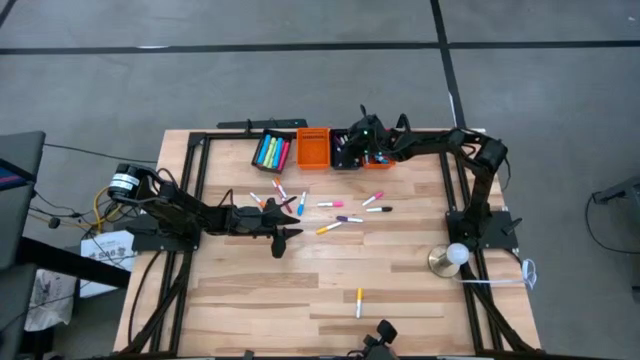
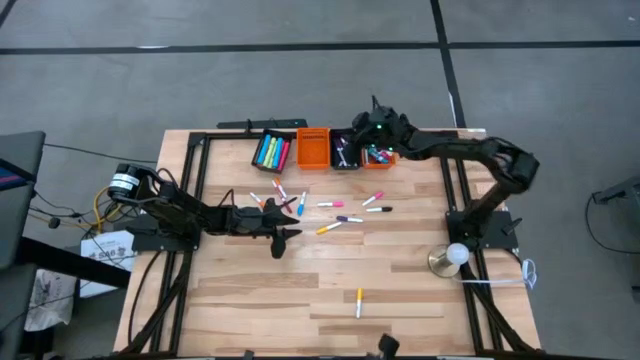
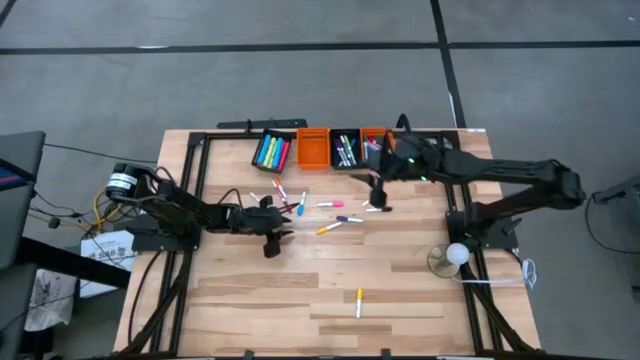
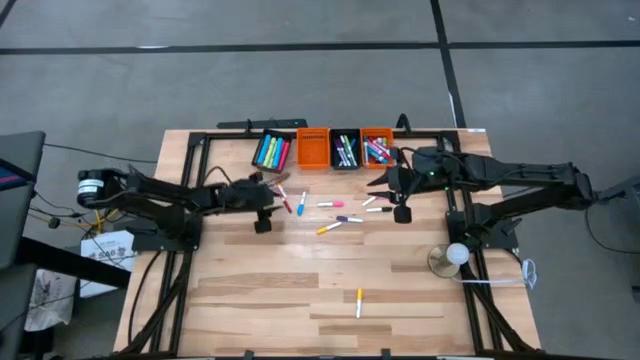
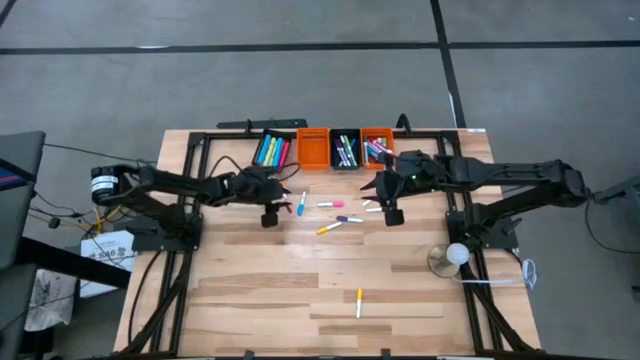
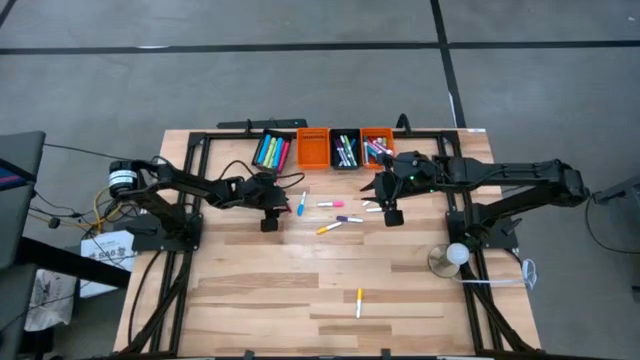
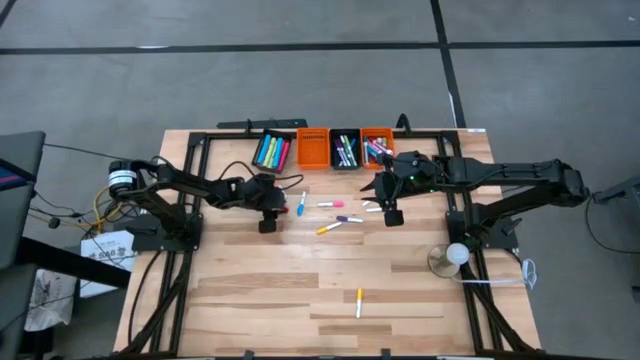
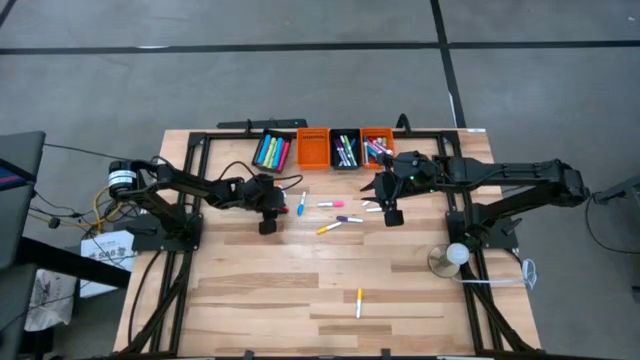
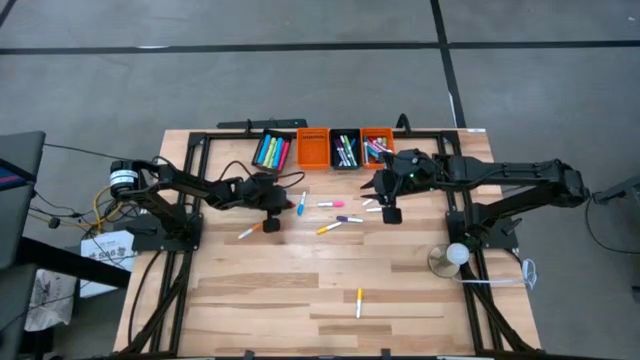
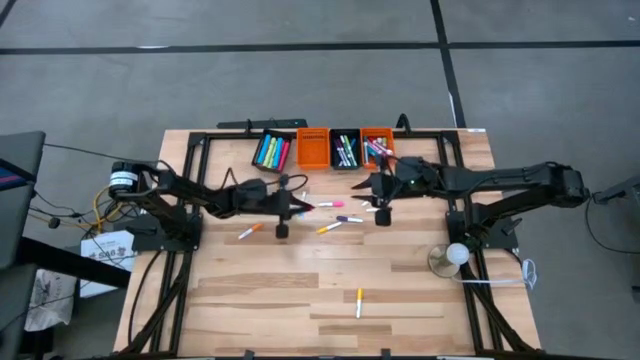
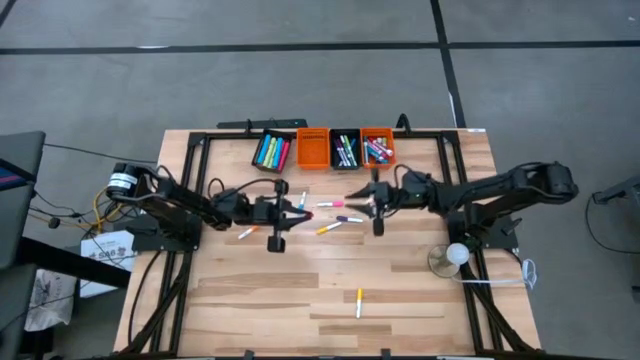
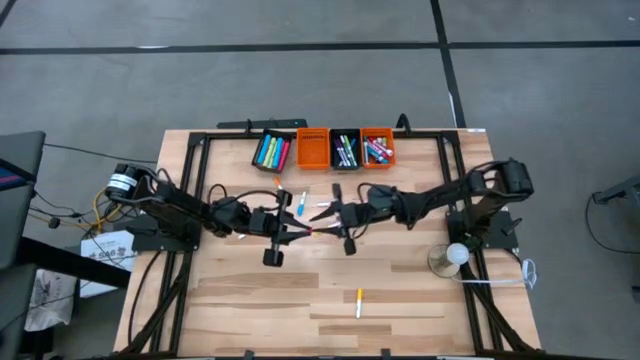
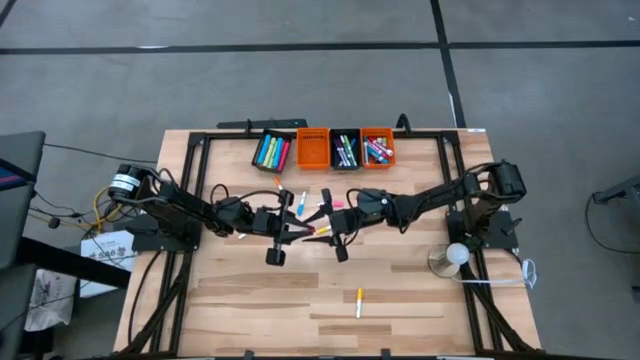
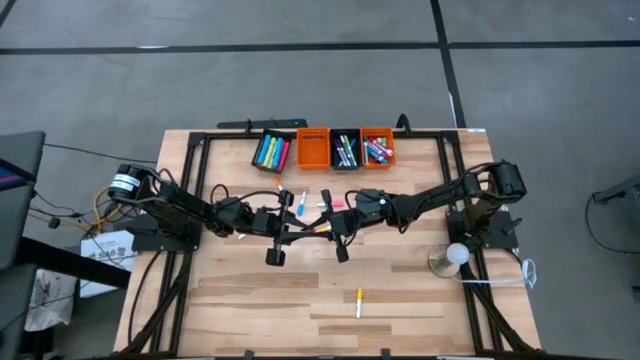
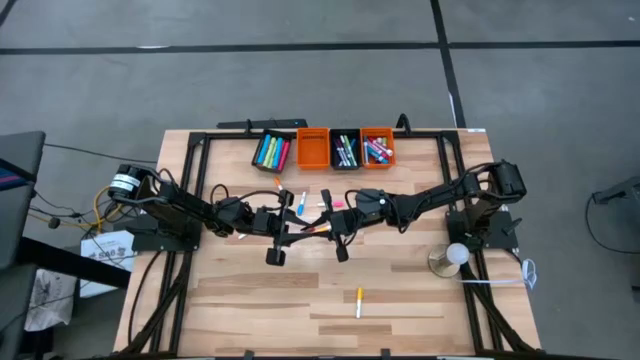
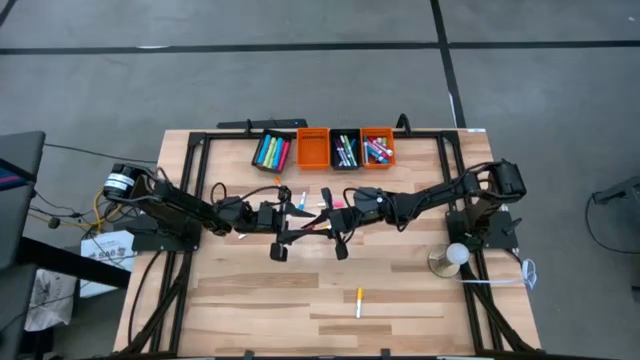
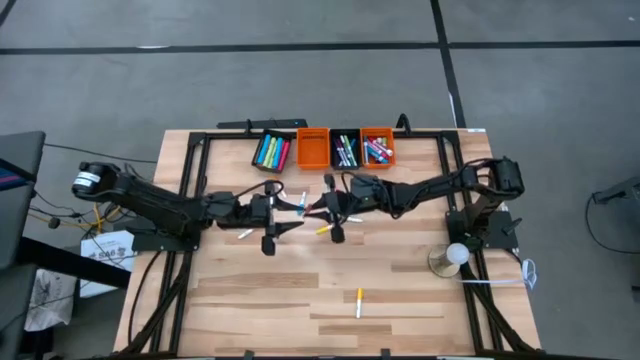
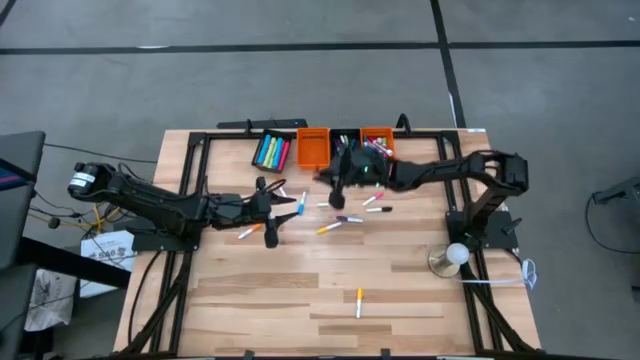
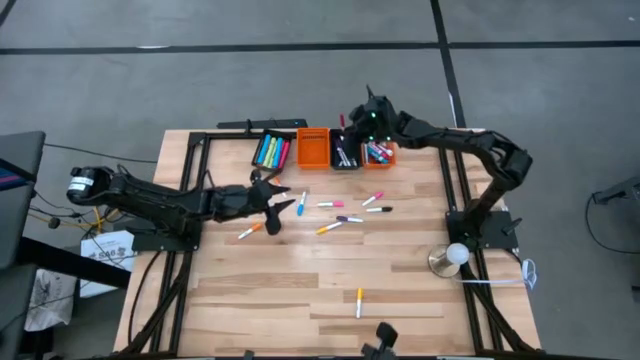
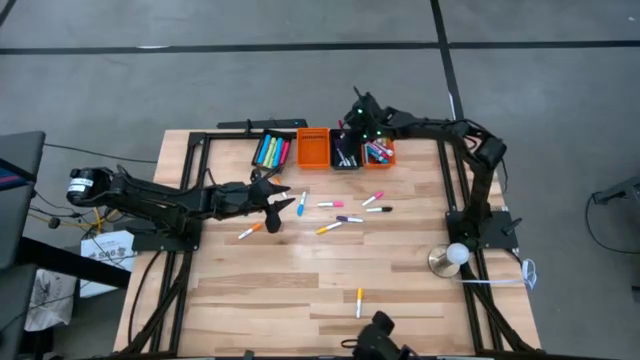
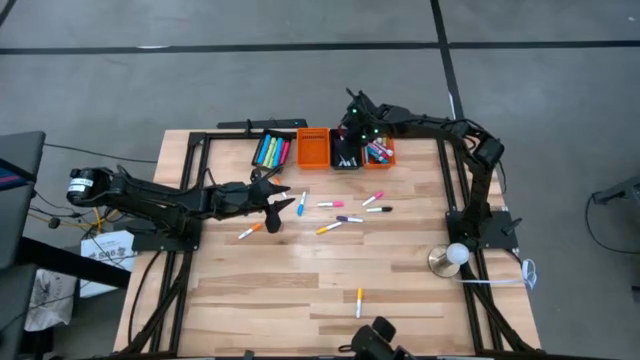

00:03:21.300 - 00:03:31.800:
Task: Pick & Place Markers
Put the small red marker pen into the right black basket

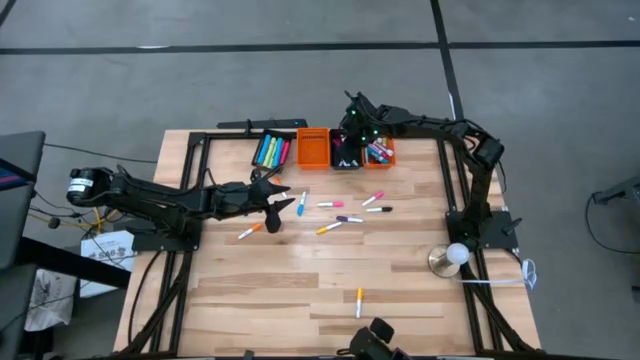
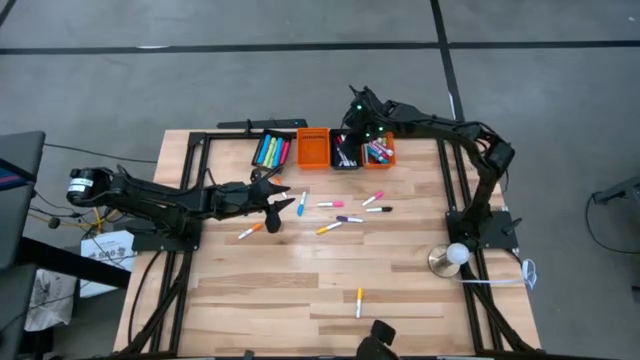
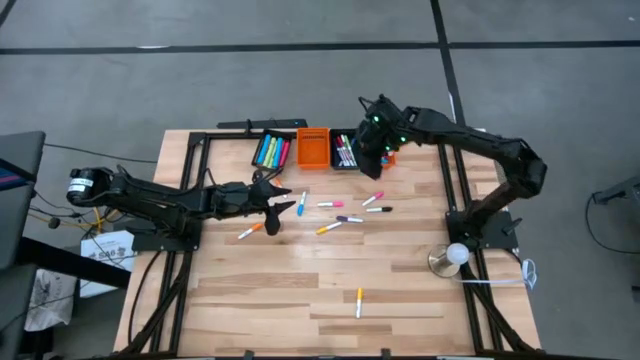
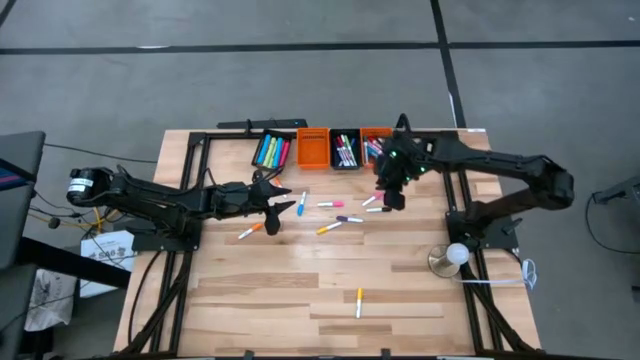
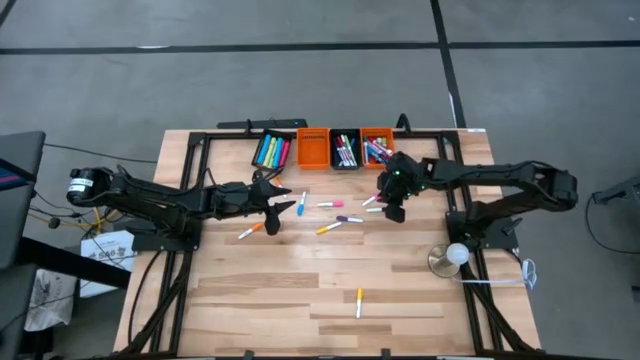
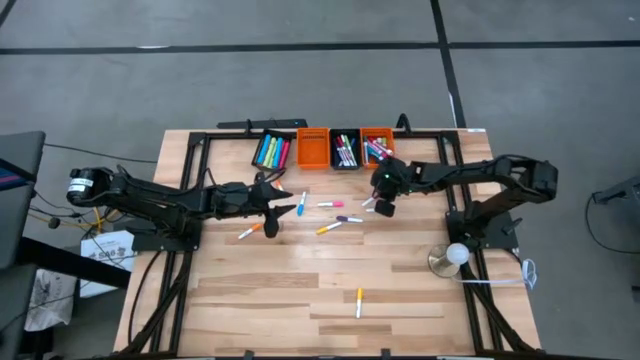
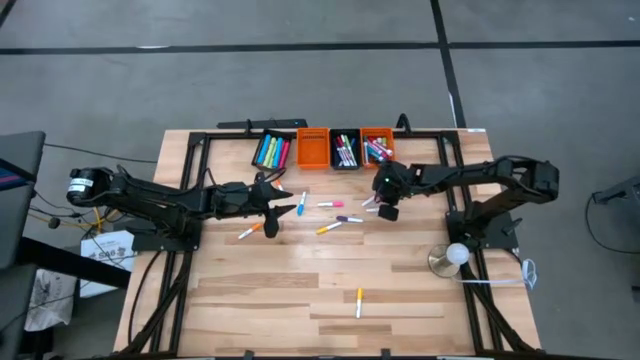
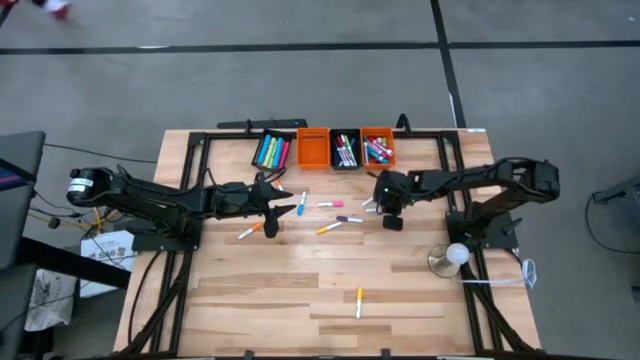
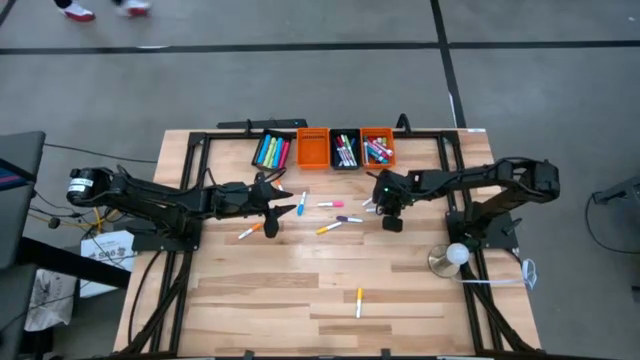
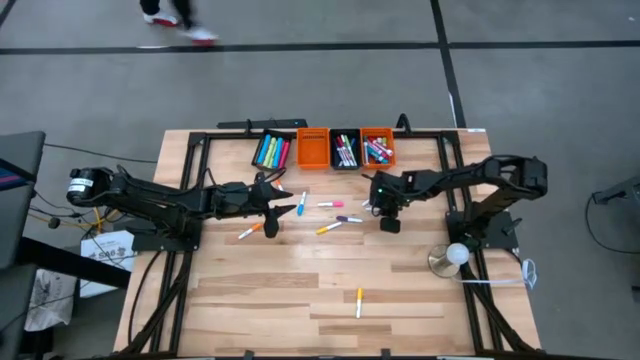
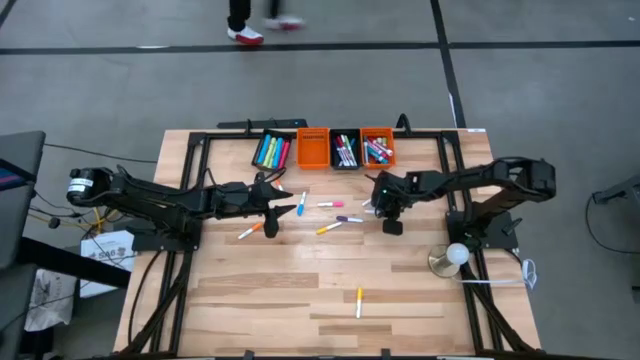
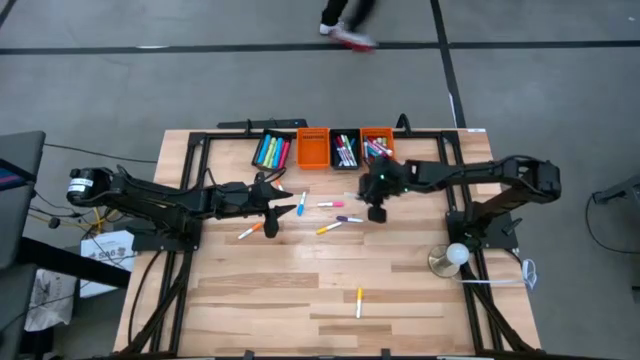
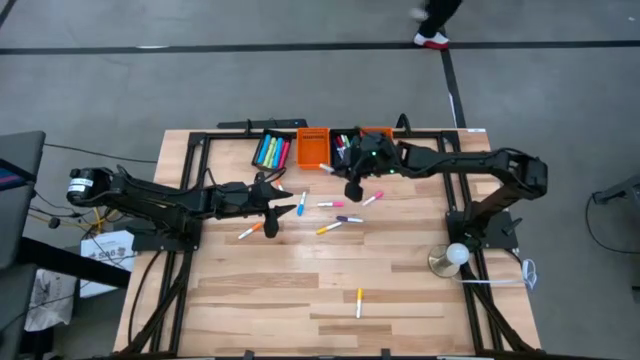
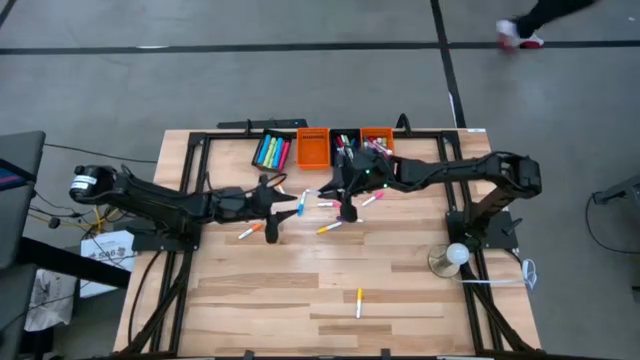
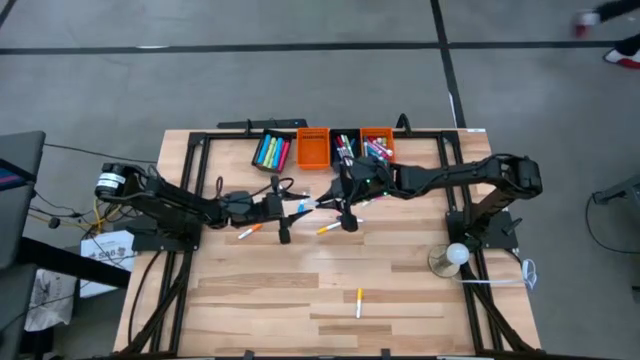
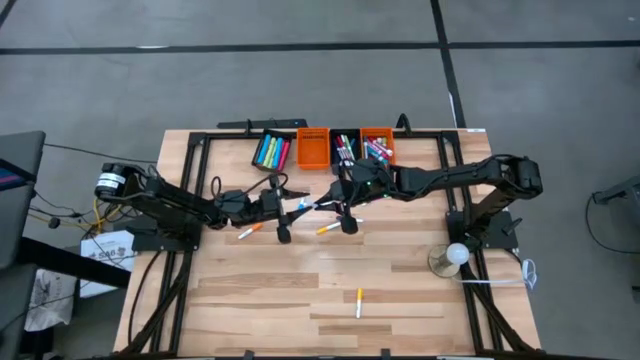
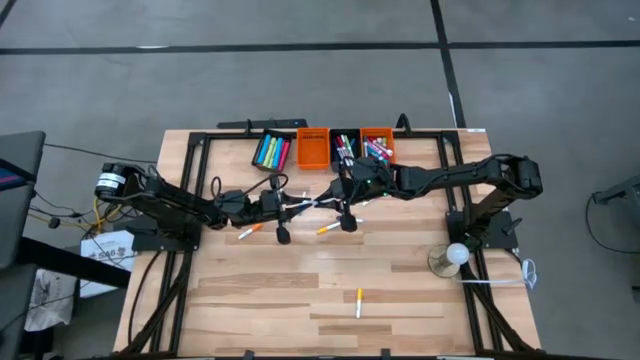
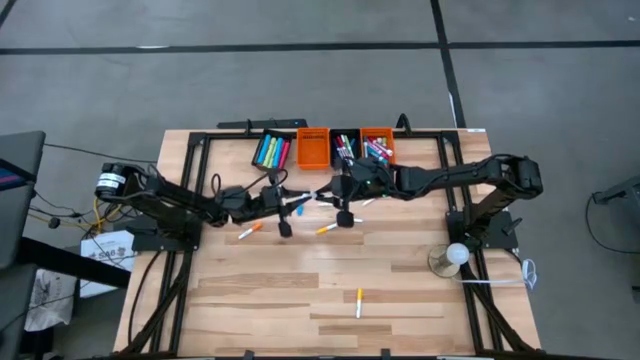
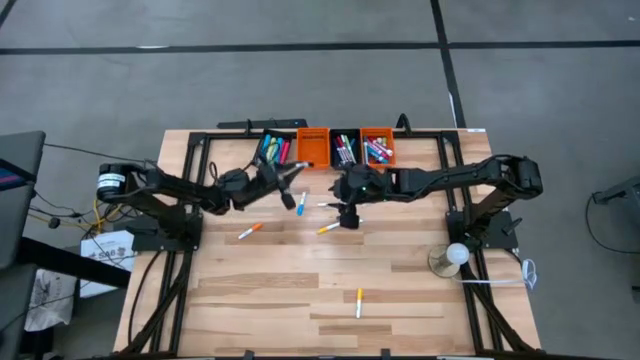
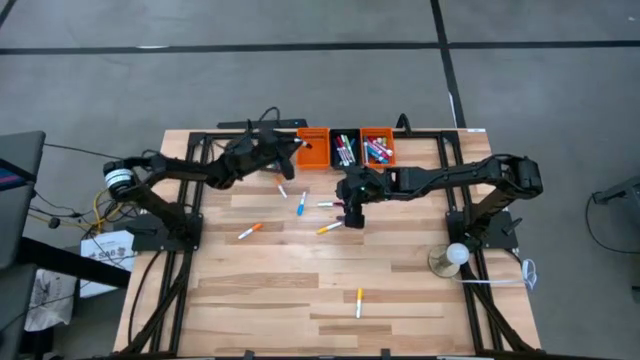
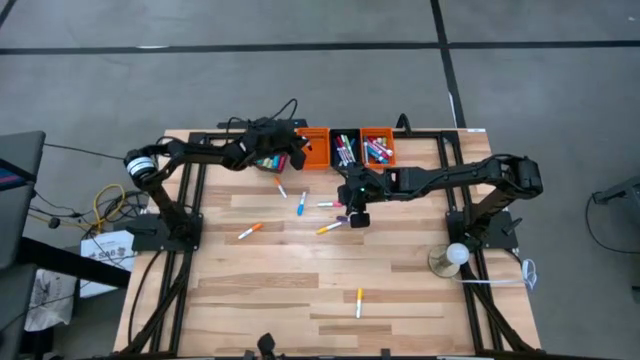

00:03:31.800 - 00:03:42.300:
Put the small black highlighter pen into the left orange basket
